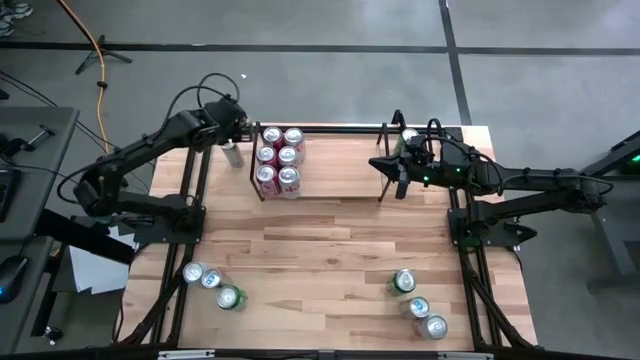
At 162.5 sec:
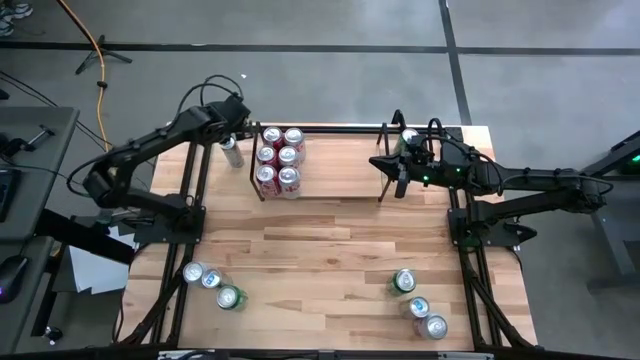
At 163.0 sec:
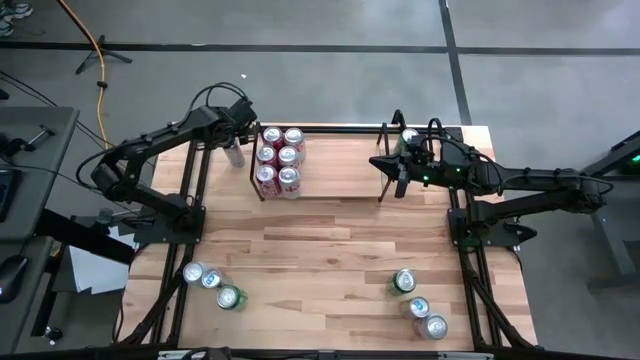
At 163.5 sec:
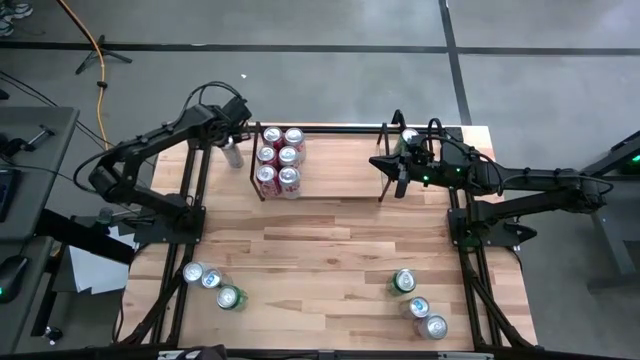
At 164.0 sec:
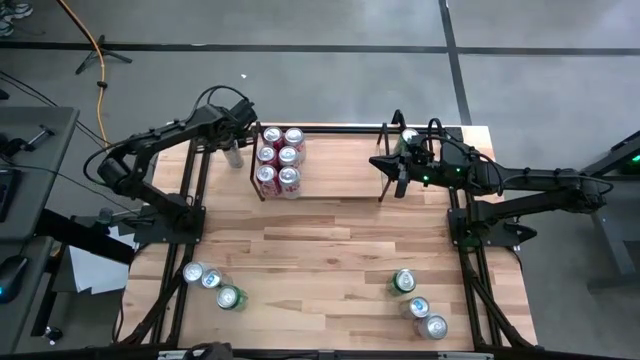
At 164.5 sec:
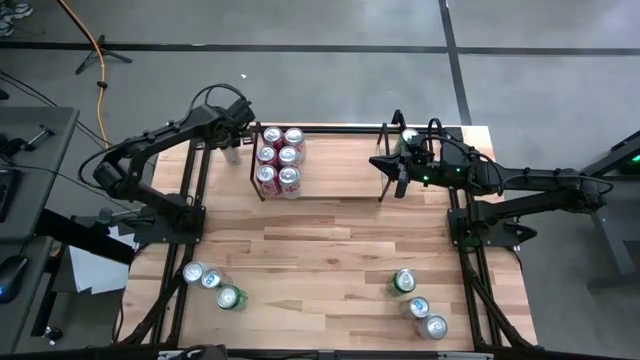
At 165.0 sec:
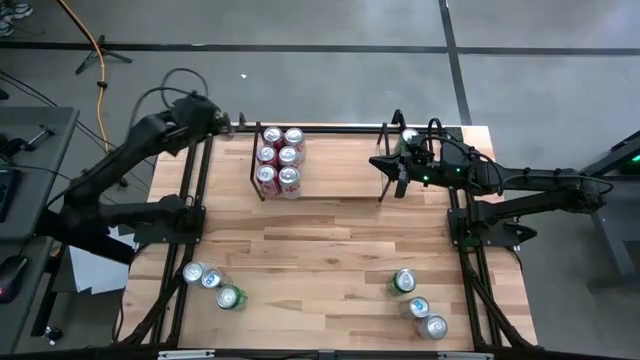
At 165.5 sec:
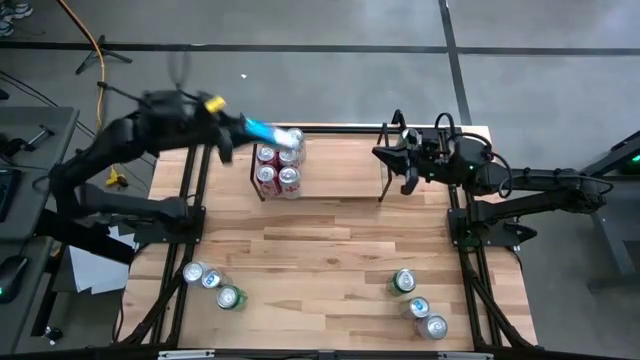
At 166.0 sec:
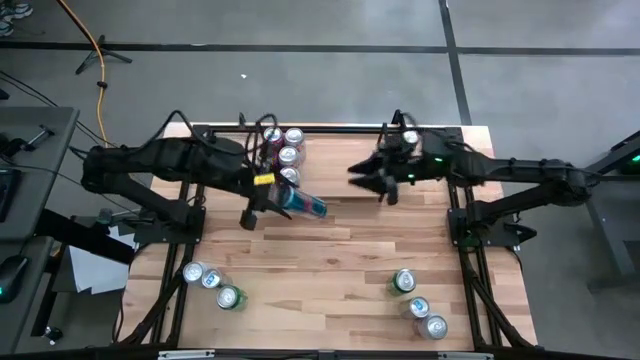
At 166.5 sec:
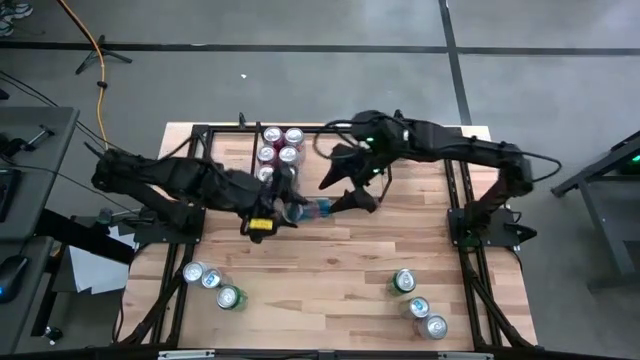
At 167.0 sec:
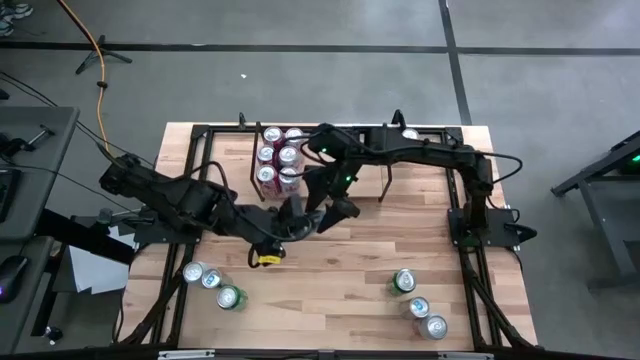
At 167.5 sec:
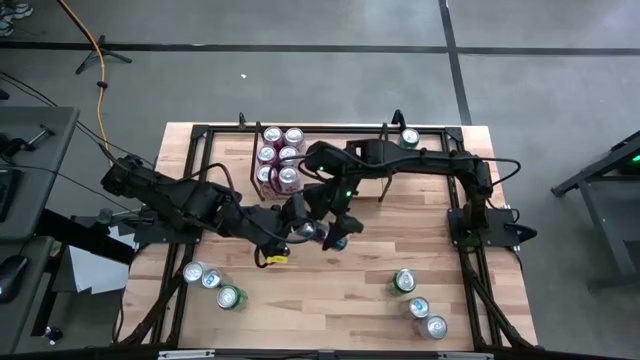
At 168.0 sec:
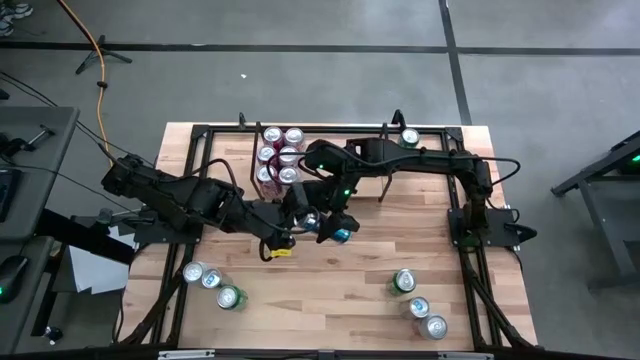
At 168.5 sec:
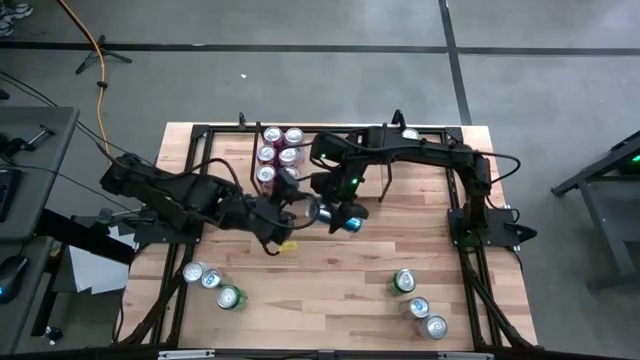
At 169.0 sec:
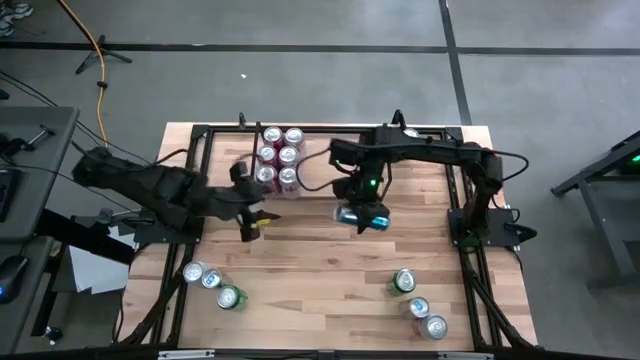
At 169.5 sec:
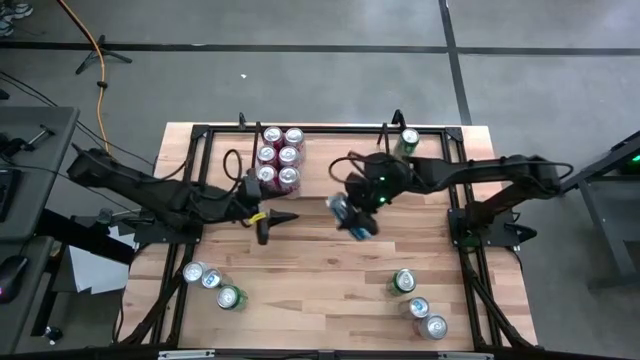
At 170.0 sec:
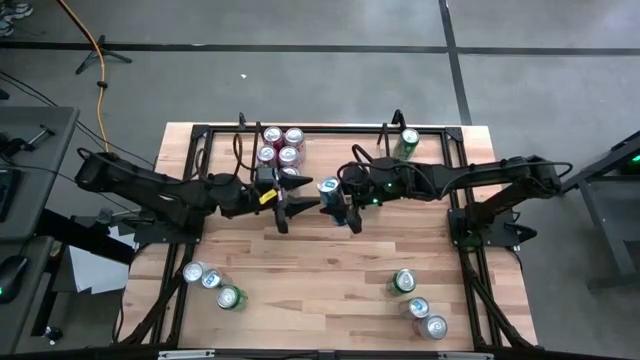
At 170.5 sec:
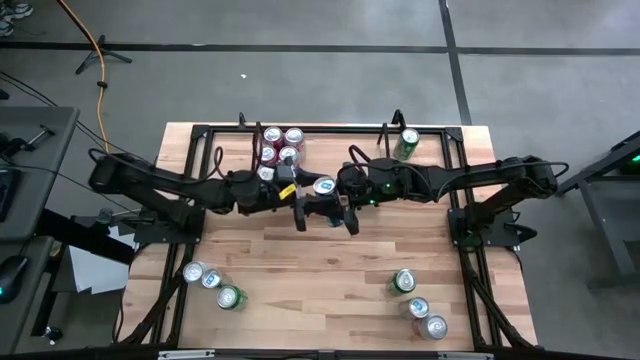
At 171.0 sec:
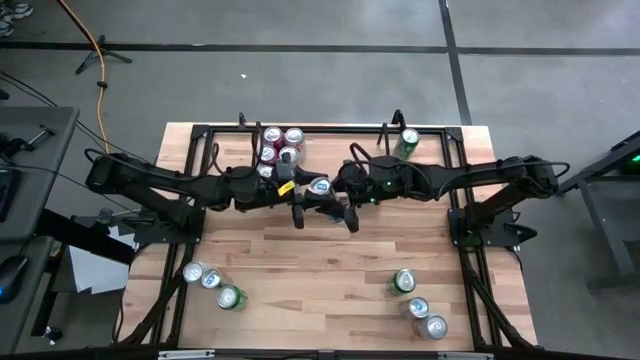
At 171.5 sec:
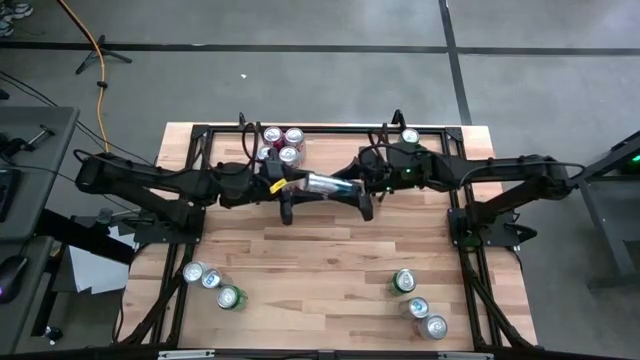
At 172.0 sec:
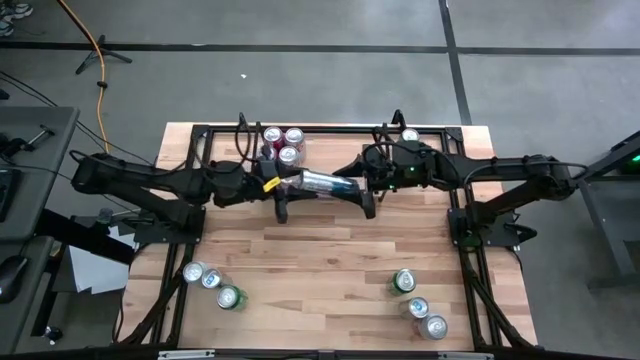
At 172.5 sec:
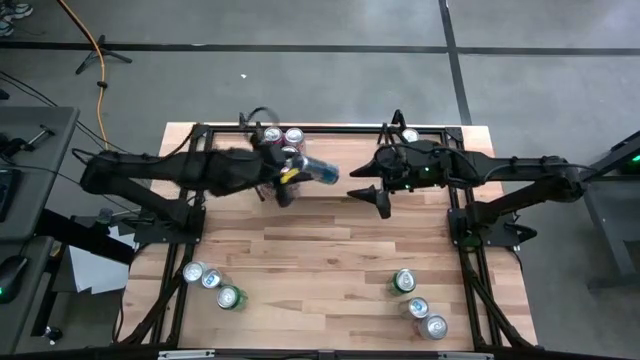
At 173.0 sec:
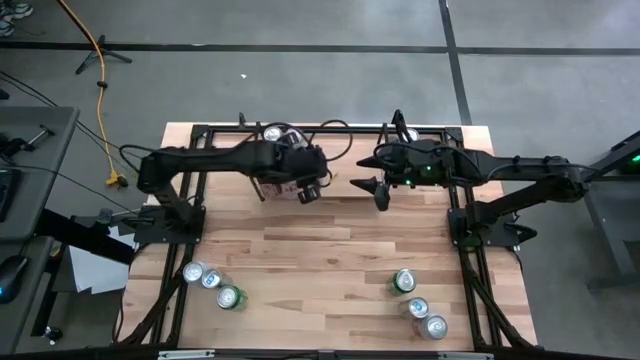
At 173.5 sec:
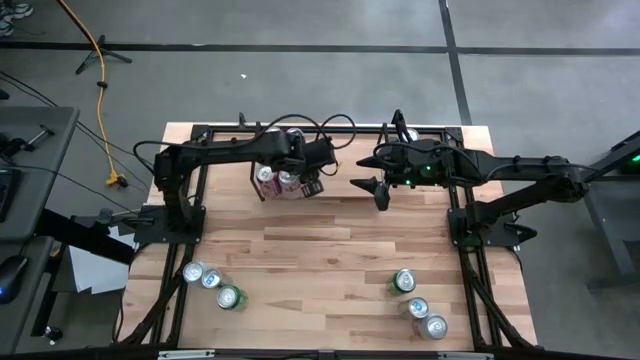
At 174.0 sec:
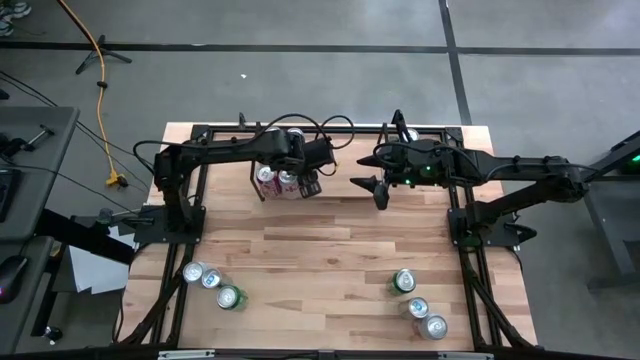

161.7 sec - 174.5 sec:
Task: Place canned beverage on shelf
Put the top blue soda can on the shelf

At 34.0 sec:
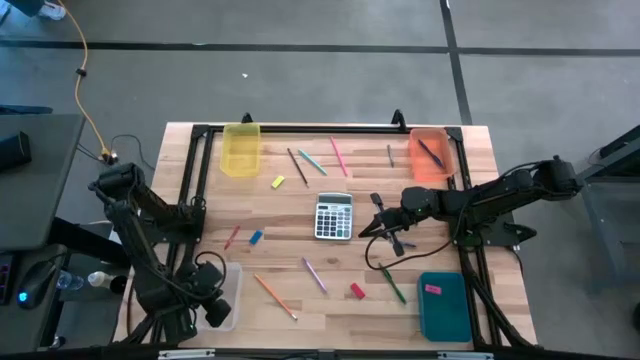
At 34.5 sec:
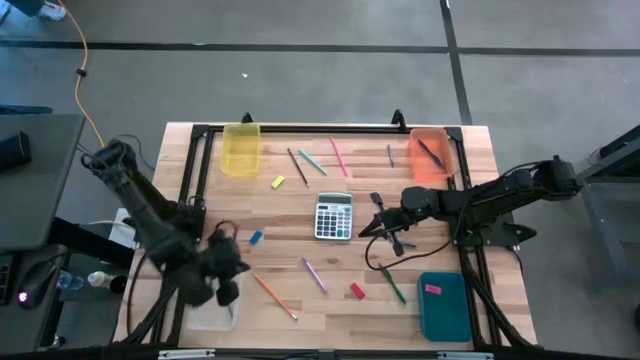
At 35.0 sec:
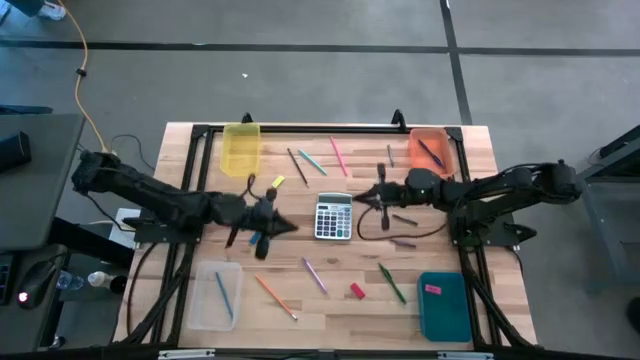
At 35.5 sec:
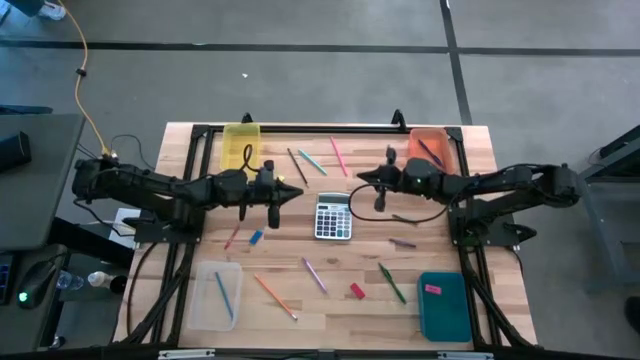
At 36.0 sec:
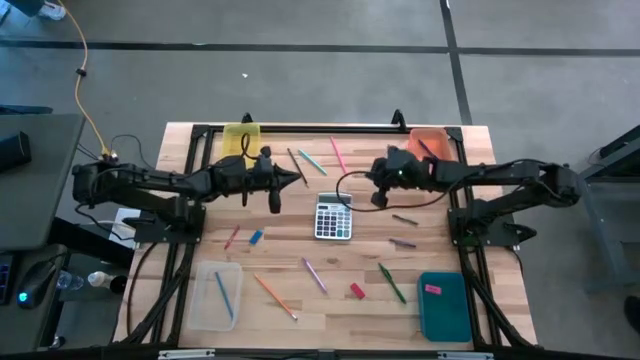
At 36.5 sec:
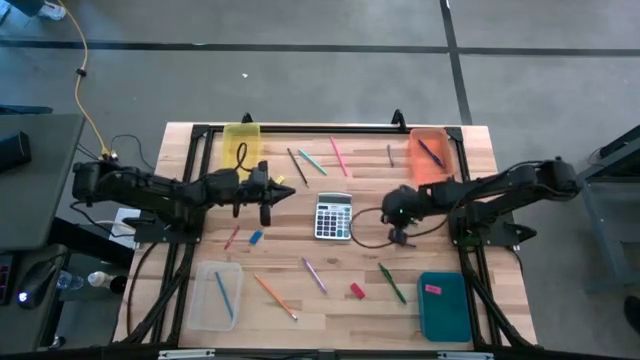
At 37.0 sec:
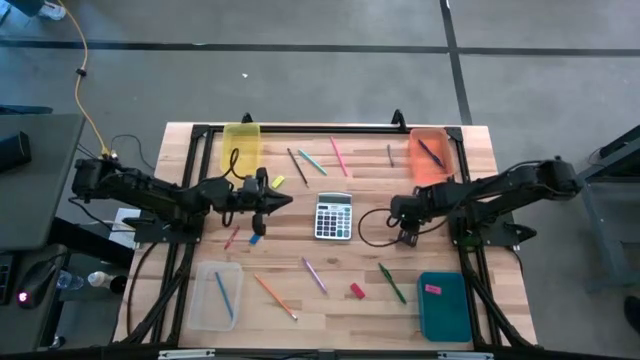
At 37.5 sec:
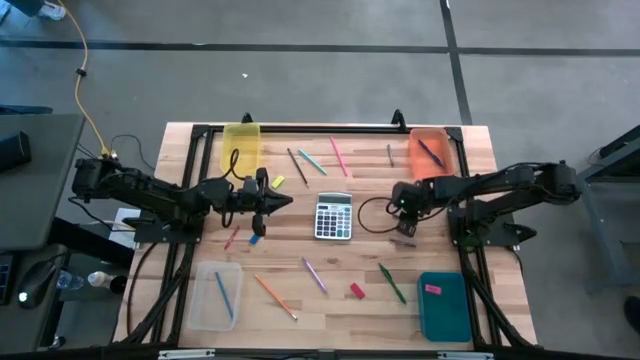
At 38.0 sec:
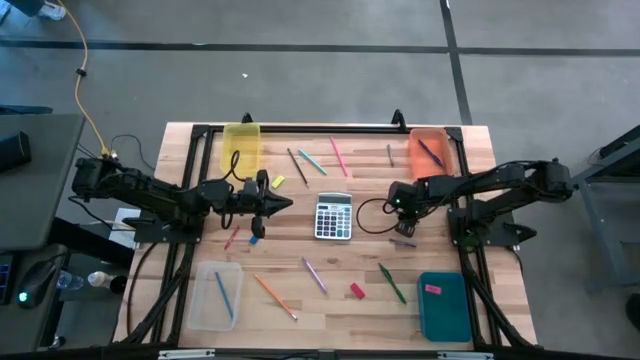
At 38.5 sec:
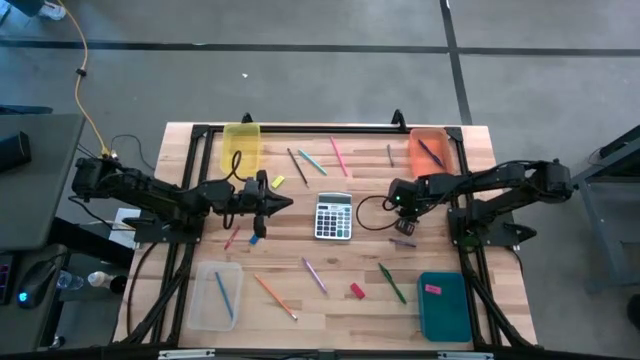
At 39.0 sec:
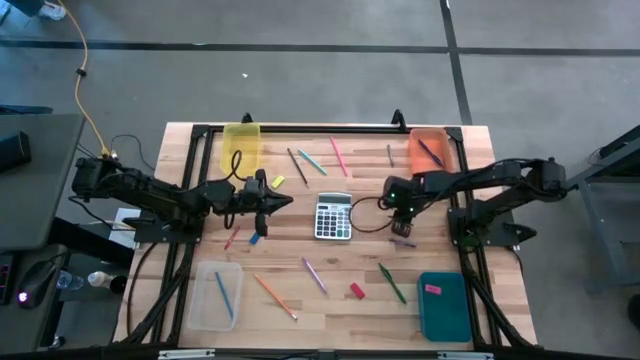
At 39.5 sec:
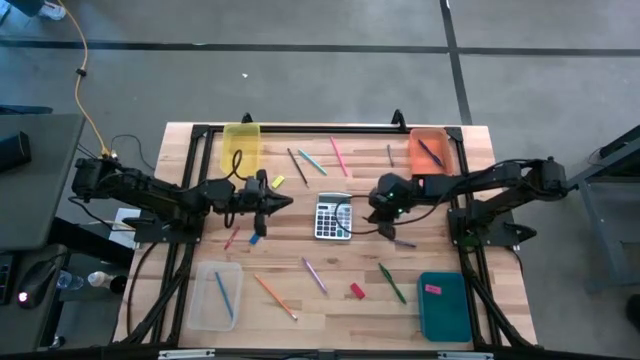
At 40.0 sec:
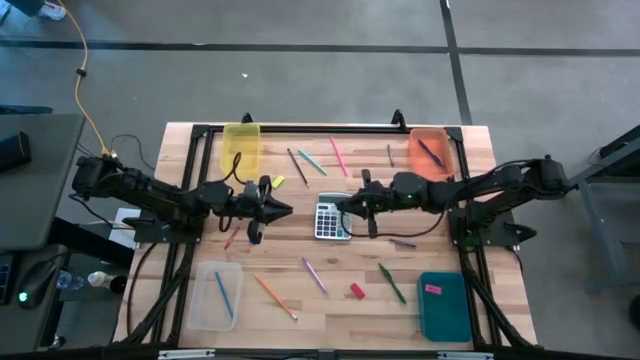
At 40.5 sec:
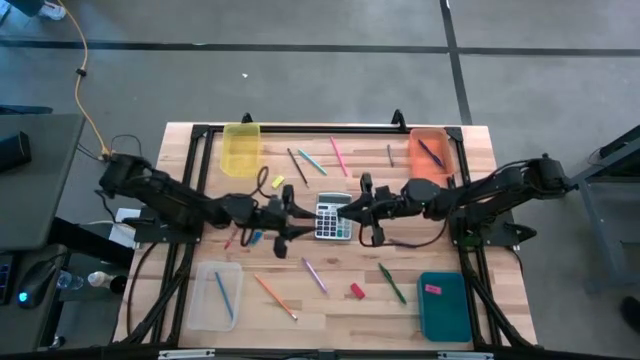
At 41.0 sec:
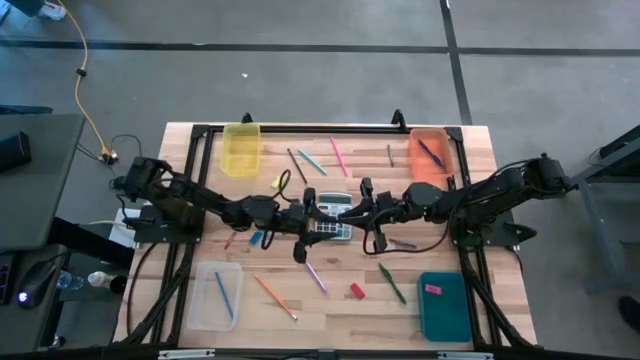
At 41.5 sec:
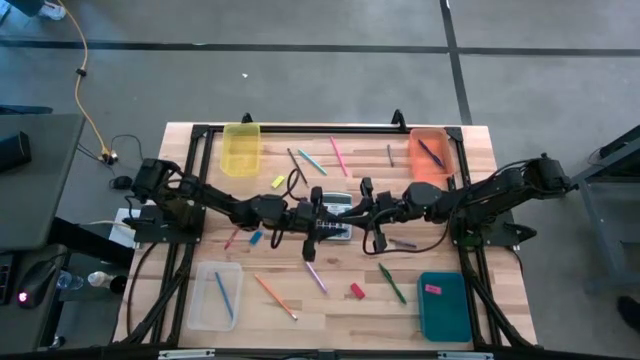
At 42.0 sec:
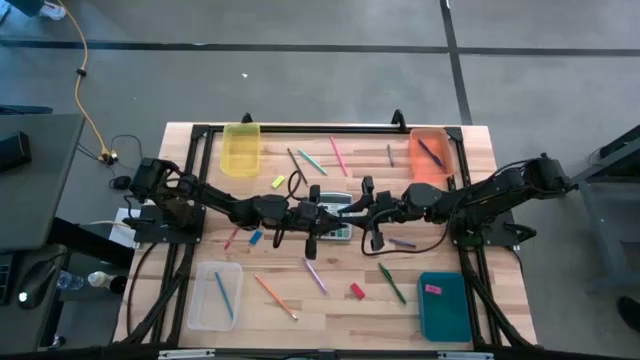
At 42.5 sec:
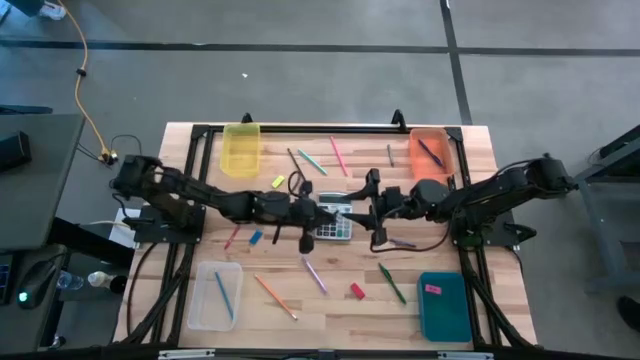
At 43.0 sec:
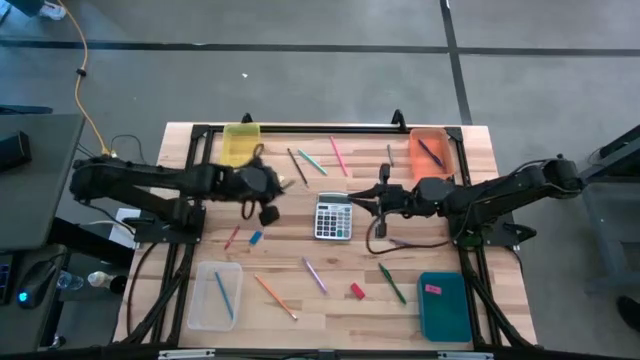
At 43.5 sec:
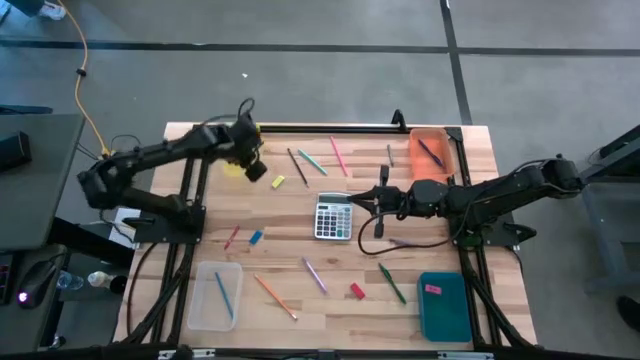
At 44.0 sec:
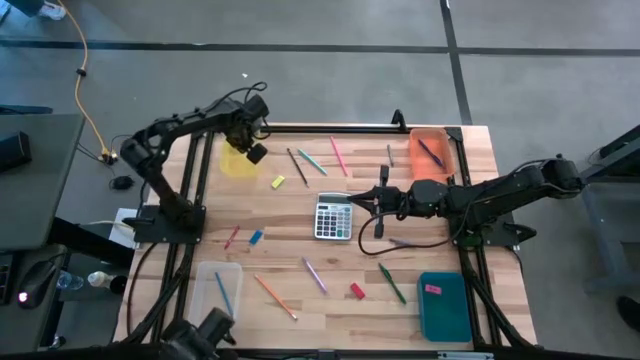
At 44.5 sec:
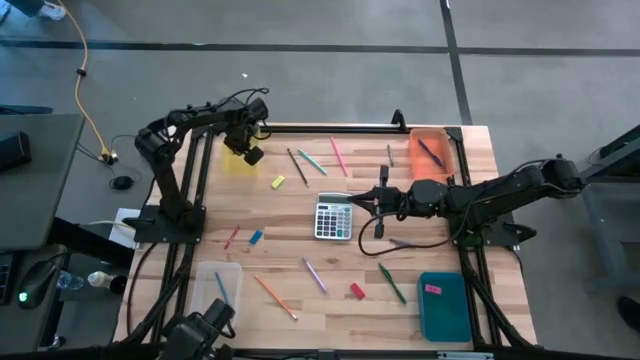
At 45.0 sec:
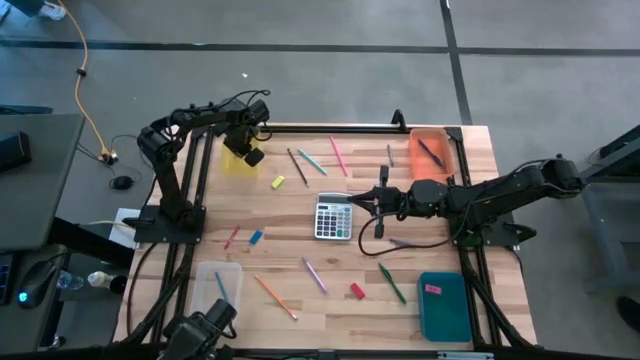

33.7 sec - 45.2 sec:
Task: Sort crayons/erasers/pens/pencils in bins
Put the green crayon into the yellow bin
